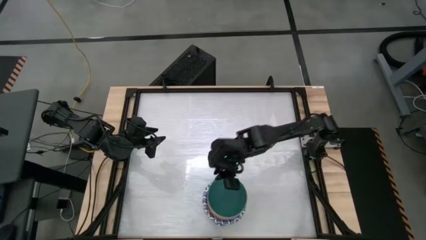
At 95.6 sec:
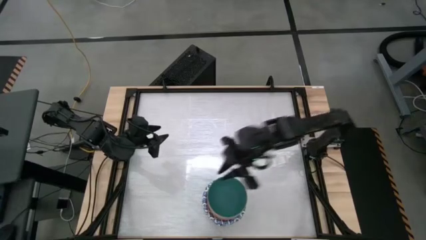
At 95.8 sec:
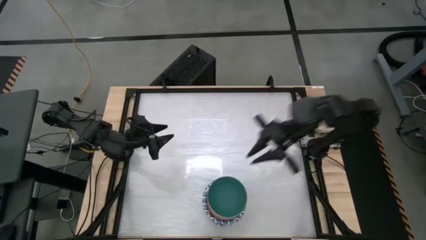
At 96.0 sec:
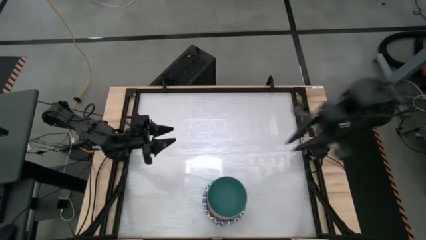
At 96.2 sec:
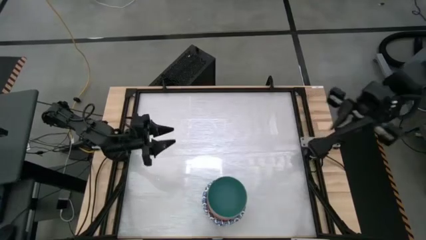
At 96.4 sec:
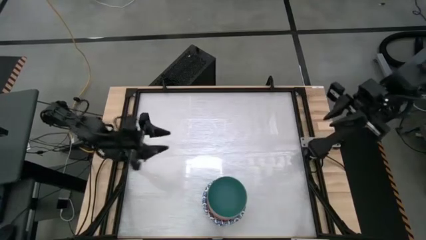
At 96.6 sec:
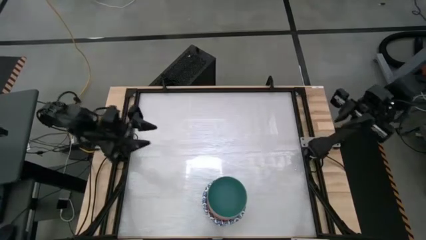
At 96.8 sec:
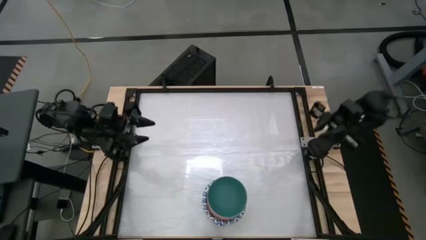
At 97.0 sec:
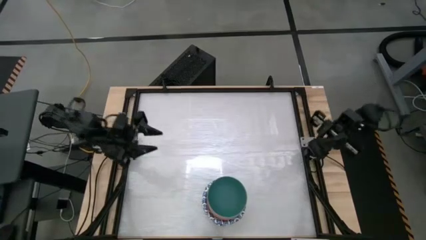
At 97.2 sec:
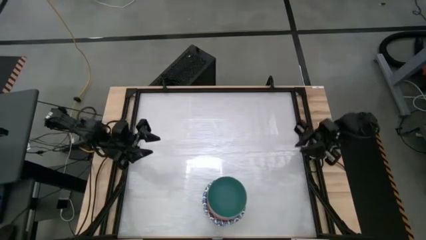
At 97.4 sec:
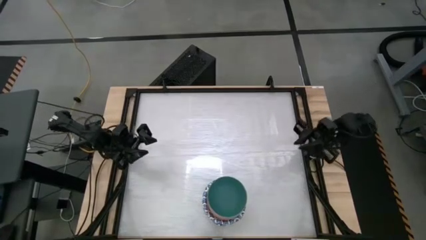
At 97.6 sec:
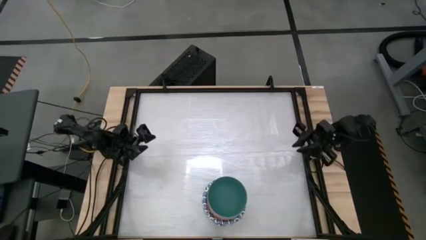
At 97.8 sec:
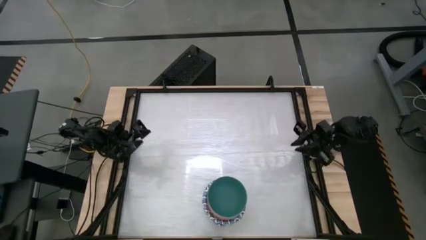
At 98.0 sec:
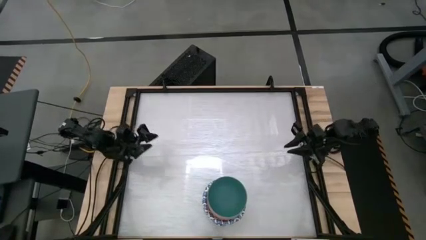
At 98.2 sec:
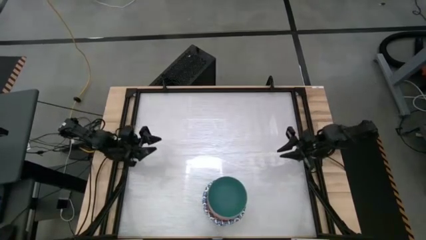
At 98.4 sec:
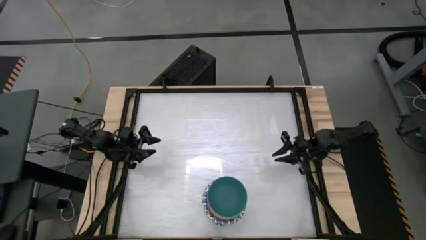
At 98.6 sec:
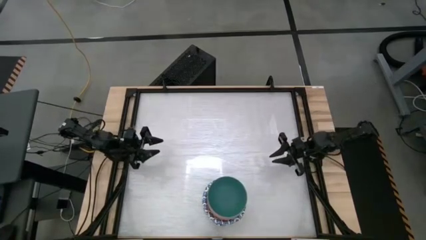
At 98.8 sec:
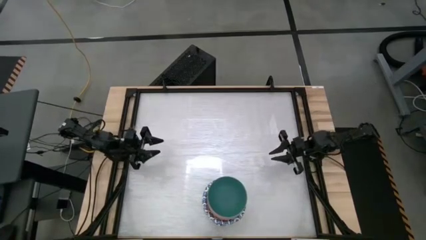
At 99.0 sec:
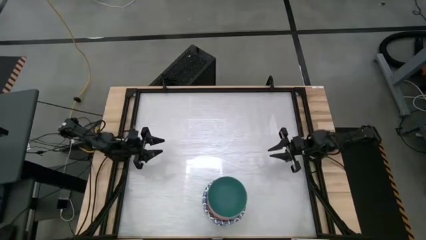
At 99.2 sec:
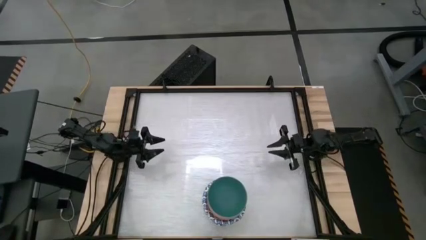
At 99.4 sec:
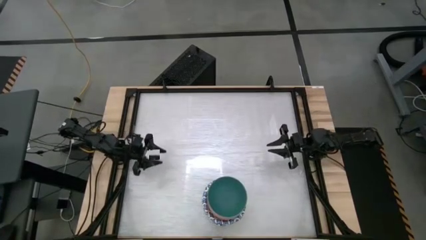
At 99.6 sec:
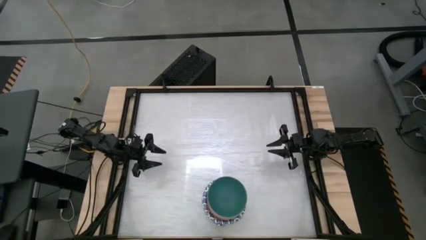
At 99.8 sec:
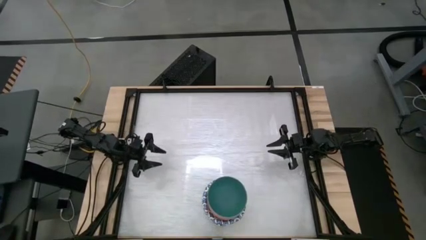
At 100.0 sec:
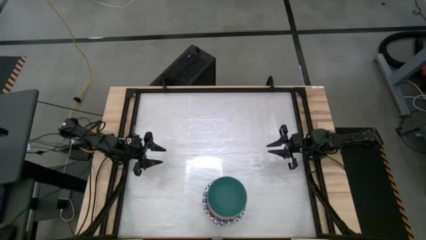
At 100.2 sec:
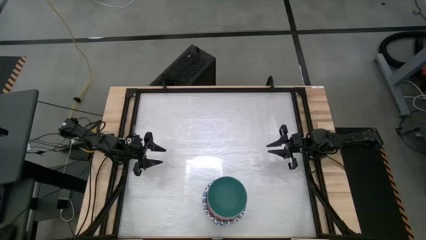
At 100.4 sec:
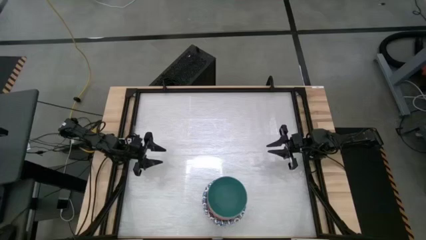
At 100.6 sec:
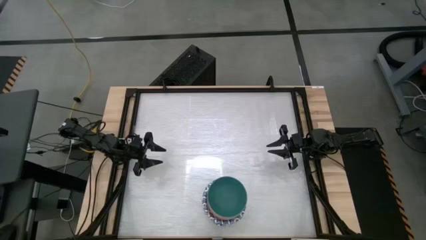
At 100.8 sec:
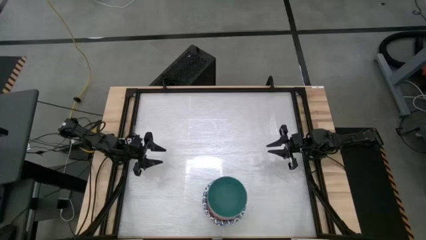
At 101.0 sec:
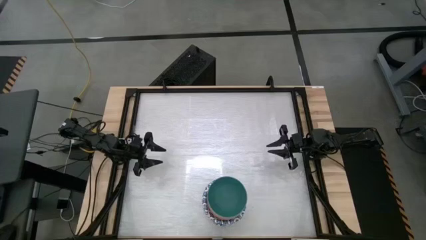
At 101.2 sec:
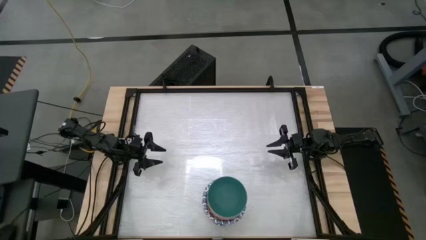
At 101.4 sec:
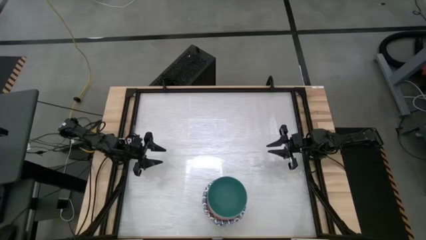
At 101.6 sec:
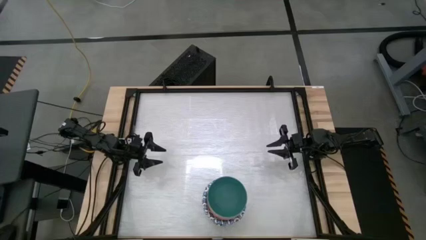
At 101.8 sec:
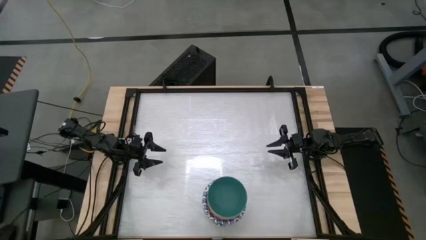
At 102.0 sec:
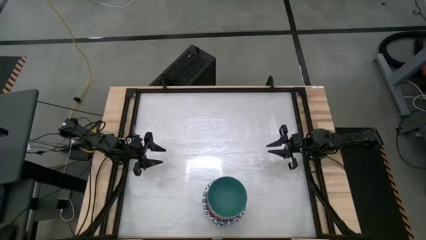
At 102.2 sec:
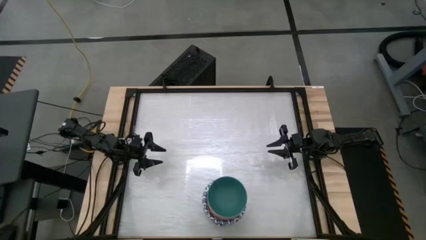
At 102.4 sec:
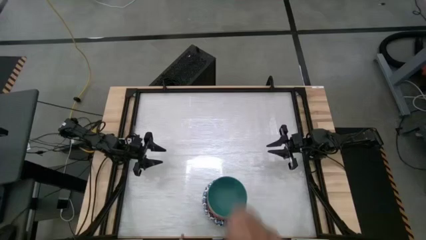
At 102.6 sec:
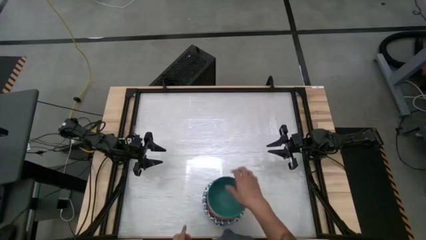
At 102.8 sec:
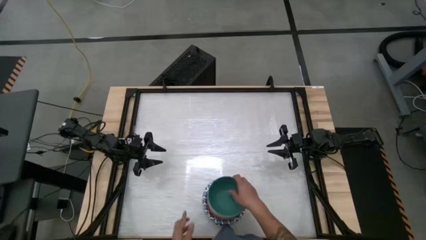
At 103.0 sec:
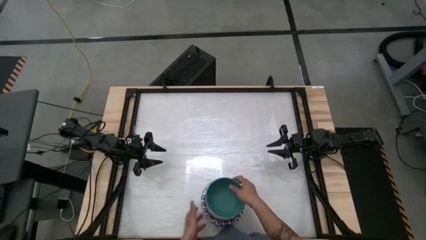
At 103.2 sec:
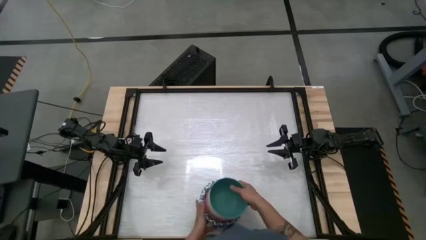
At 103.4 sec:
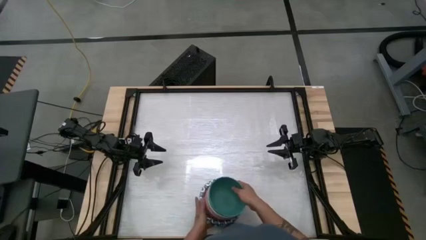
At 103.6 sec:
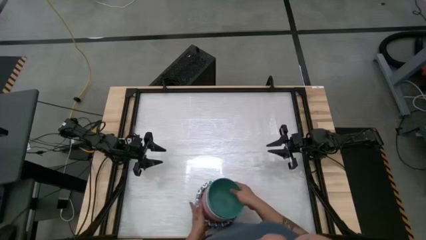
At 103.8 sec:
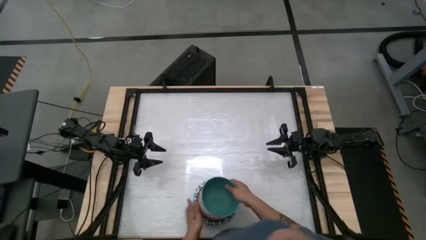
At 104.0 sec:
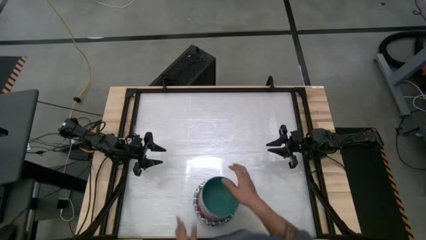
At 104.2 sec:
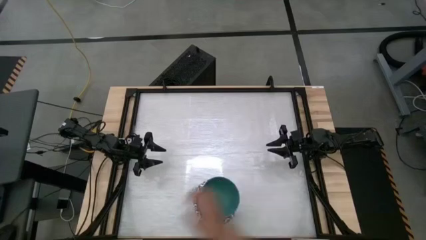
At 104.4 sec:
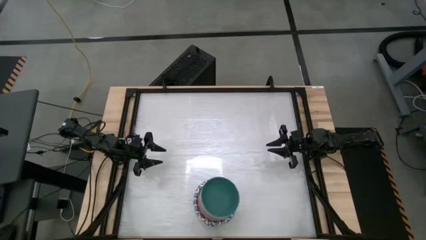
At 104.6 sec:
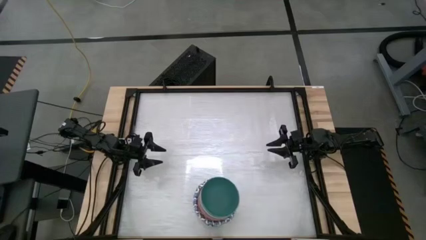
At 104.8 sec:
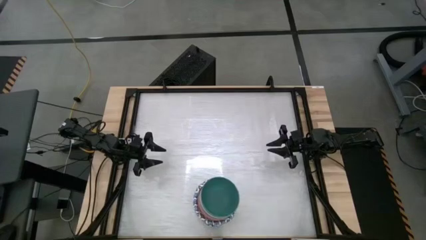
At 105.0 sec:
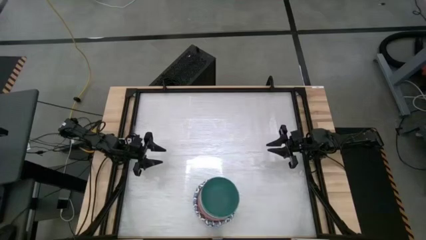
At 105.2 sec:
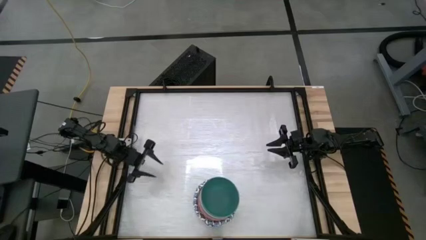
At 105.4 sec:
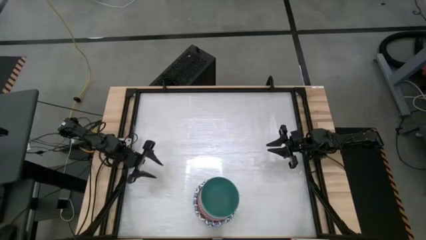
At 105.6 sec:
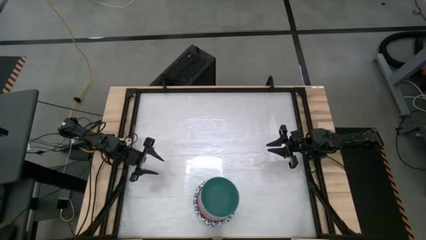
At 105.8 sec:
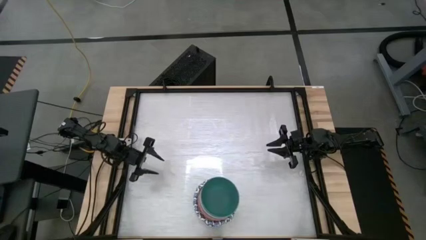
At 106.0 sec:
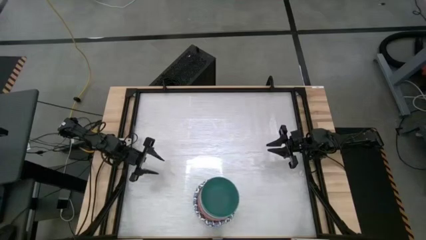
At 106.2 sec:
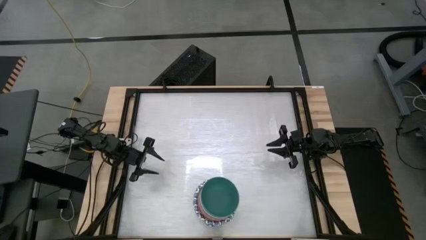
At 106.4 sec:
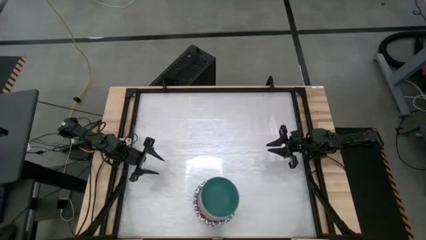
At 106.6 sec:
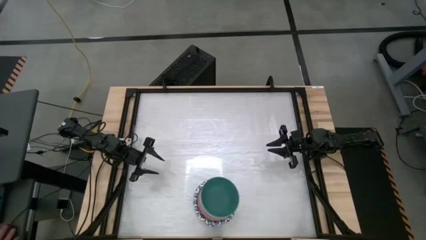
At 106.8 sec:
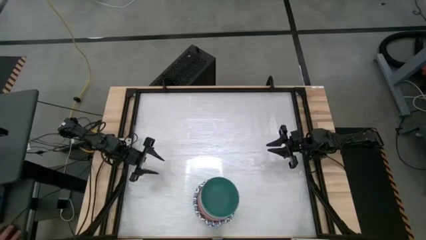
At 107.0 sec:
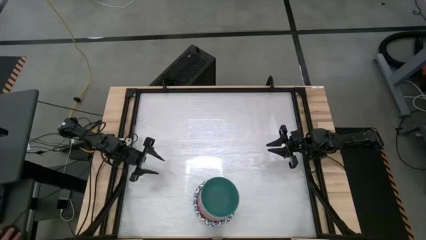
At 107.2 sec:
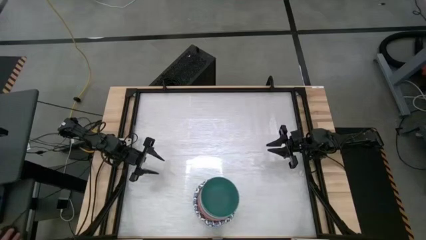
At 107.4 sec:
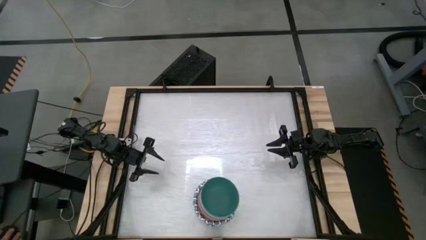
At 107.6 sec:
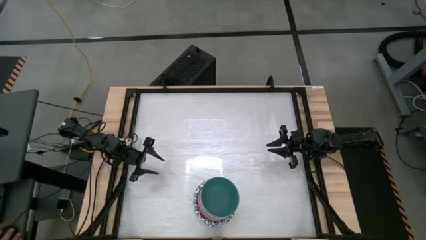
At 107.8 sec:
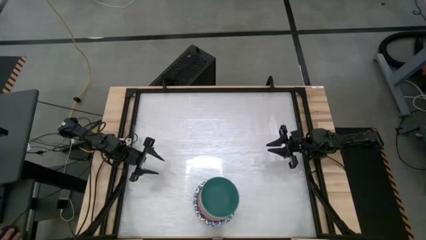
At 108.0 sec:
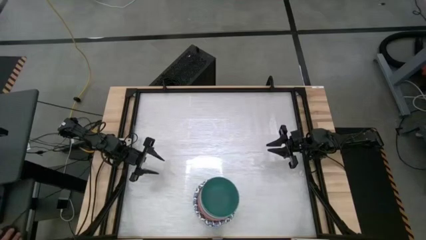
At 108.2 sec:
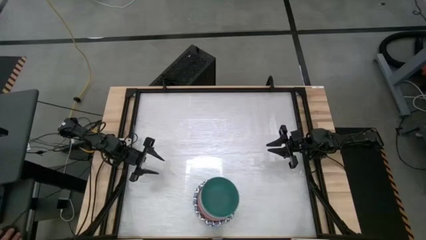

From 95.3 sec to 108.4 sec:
Task: Nest bowls inside each other by size order
Return to Home Position

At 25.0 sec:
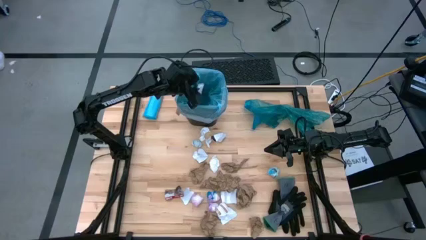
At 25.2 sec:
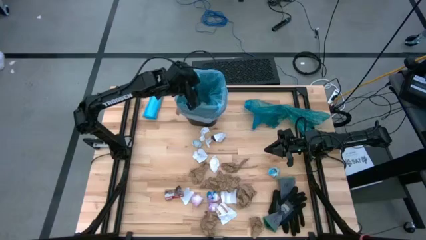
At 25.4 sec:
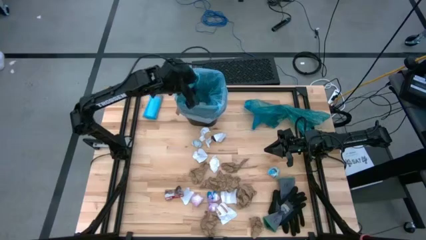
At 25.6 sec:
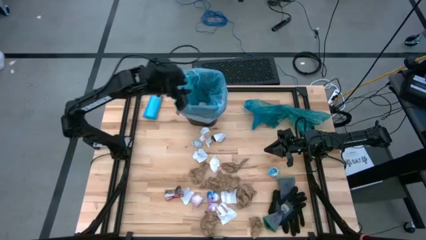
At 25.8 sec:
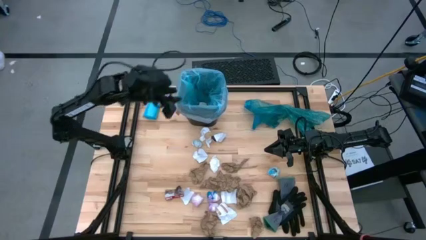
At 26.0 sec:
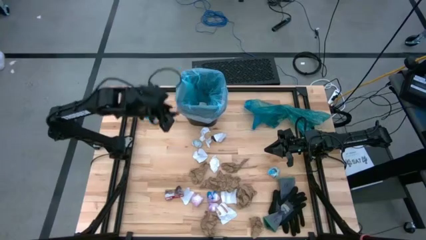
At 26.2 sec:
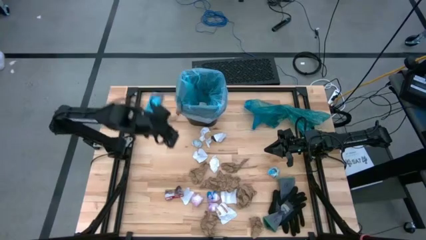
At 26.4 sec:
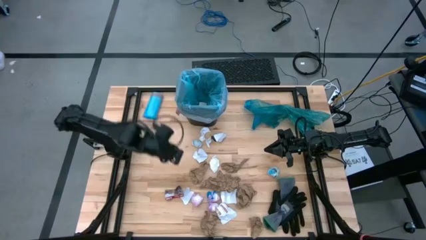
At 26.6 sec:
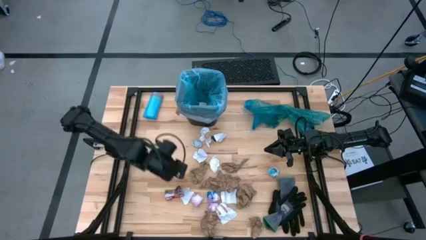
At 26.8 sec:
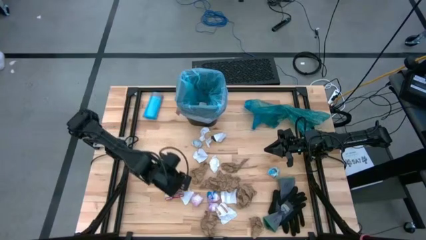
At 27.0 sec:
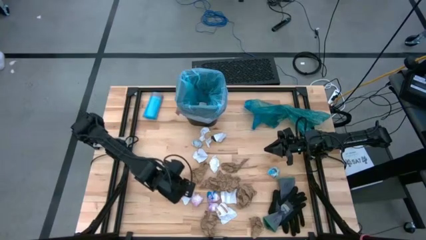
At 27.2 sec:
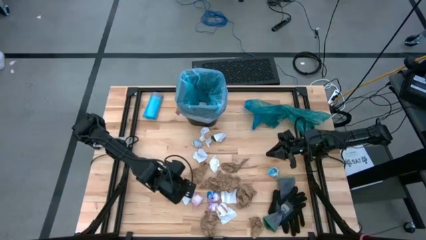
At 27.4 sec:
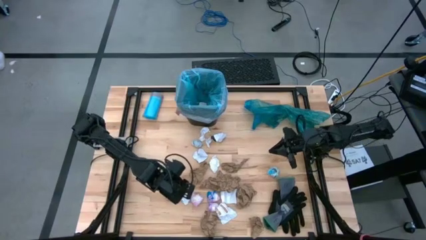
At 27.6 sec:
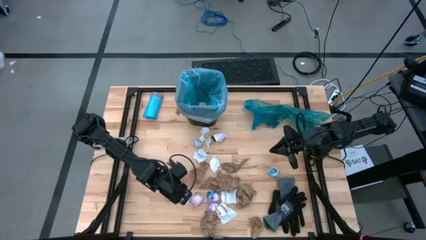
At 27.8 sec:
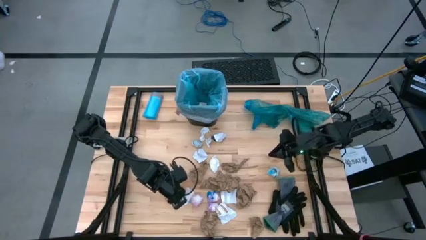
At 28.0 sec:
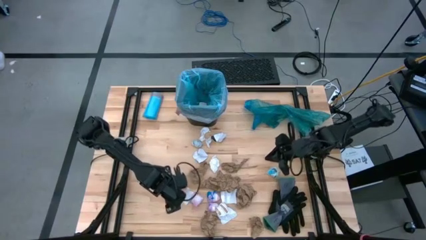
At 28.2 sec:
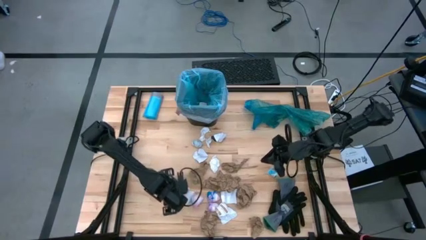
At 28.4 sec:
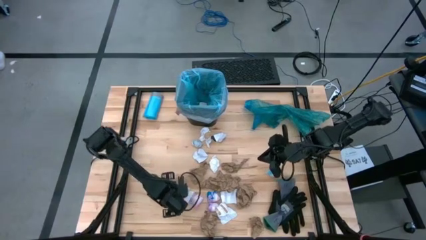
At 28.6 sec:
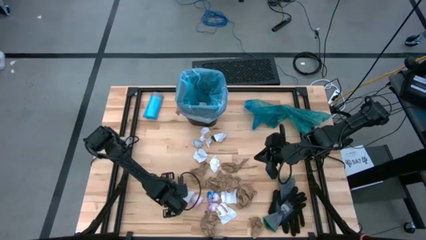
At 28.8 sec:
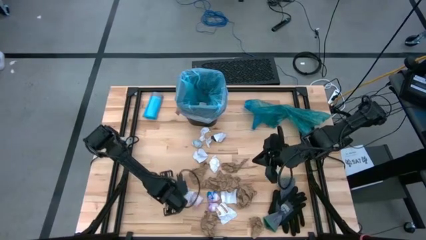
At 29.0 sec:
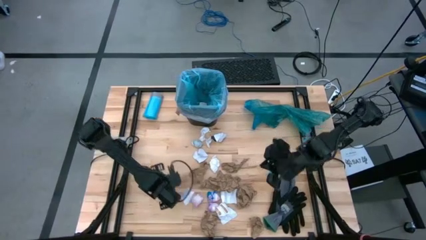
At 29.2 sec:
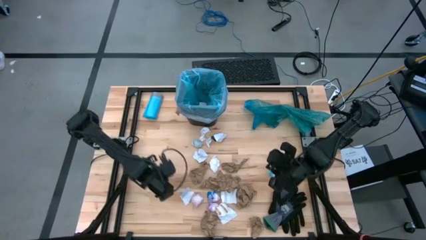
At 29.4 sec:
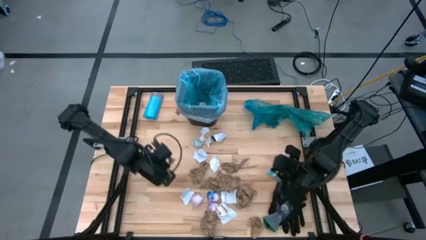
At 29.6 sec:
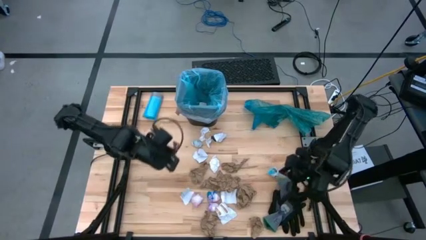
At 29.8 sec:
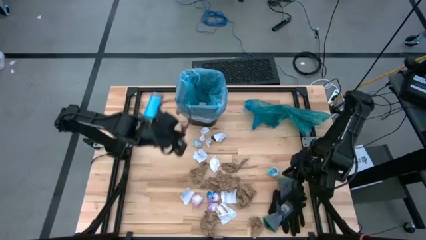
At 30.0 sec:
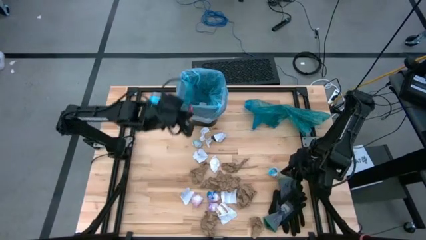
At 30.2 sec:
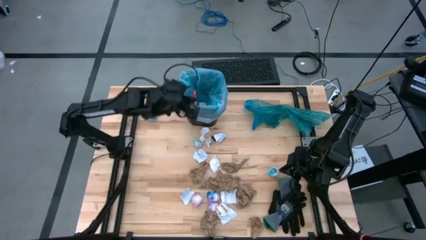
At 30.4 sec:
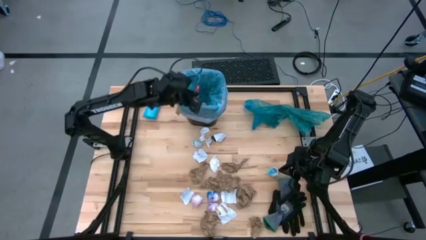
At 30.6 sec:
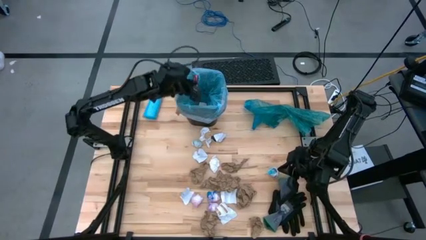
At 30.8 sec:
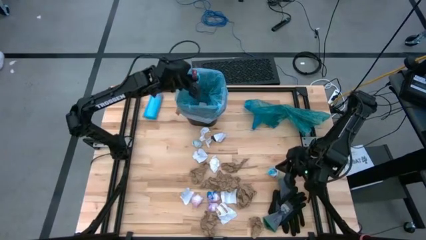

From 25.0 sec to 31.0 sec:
Task: place trash/remove bag and relplace
Put the black paper trash into the trash bin
